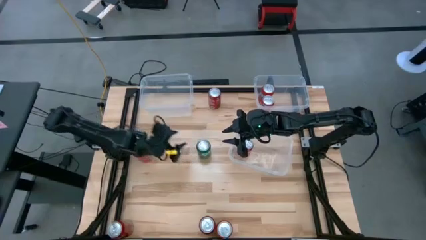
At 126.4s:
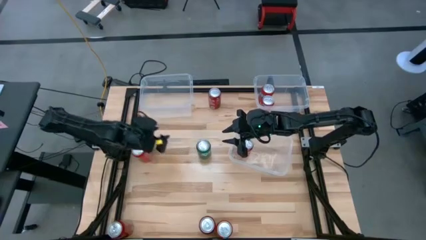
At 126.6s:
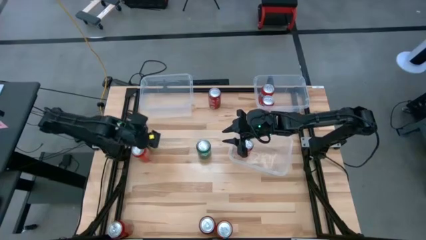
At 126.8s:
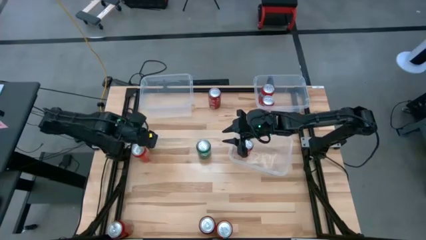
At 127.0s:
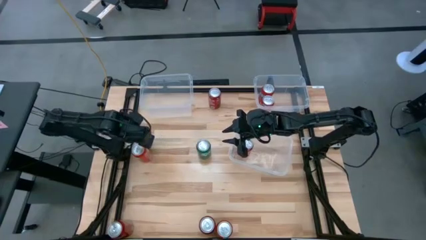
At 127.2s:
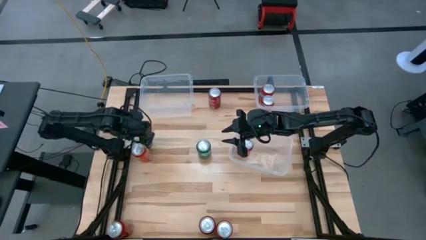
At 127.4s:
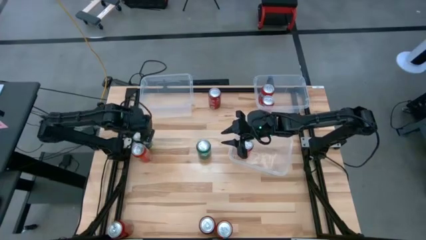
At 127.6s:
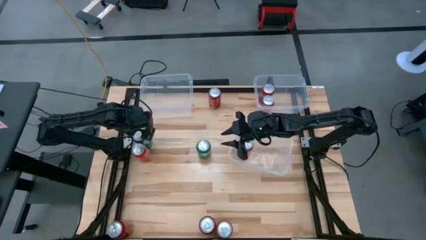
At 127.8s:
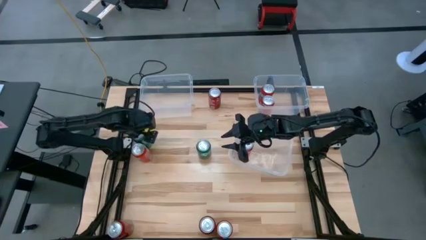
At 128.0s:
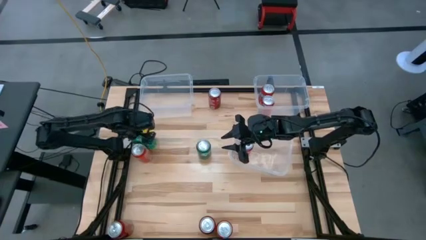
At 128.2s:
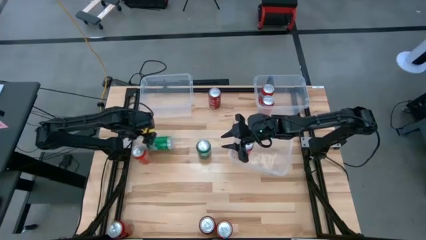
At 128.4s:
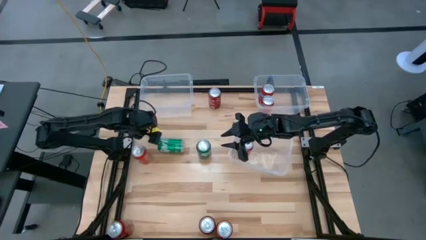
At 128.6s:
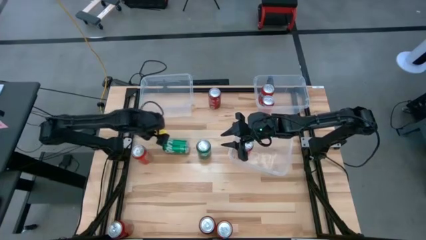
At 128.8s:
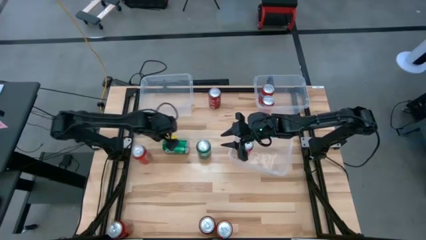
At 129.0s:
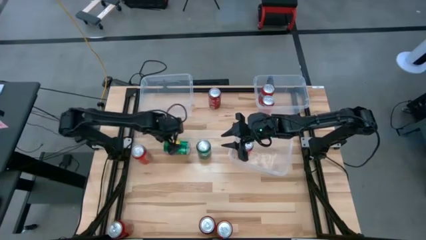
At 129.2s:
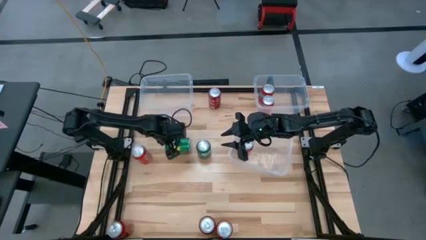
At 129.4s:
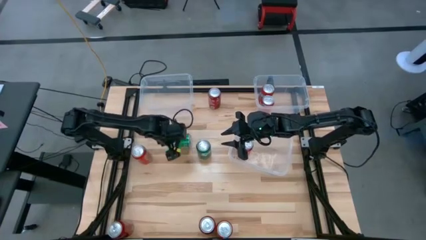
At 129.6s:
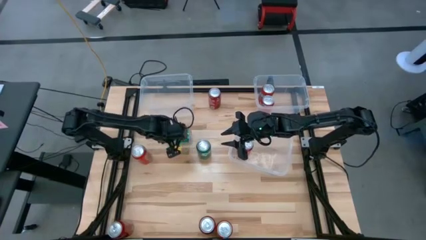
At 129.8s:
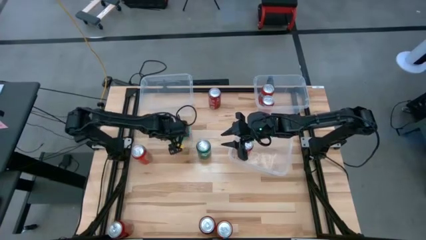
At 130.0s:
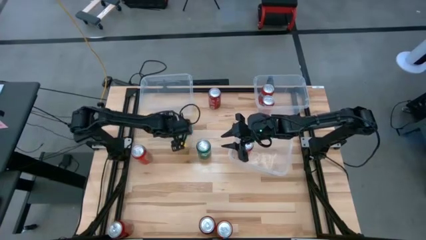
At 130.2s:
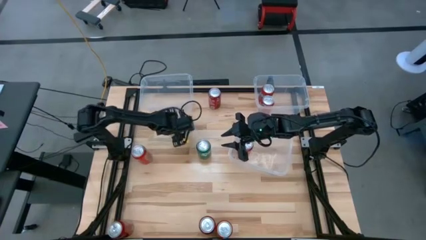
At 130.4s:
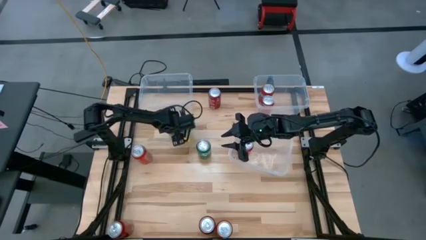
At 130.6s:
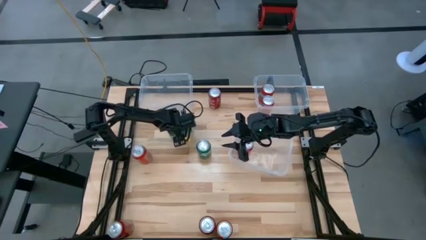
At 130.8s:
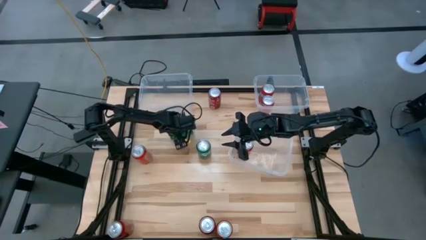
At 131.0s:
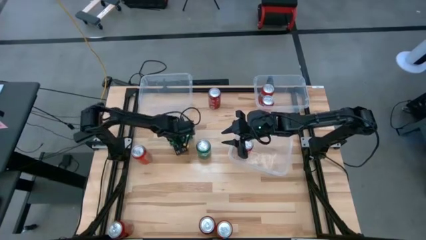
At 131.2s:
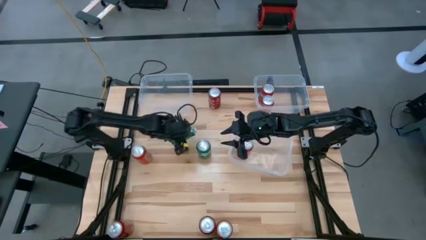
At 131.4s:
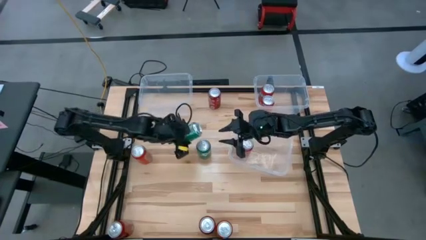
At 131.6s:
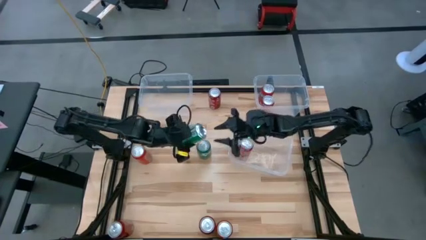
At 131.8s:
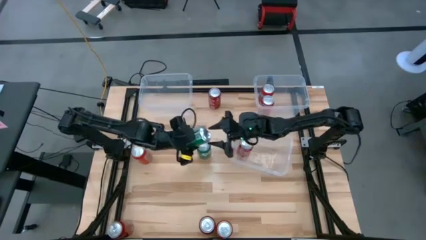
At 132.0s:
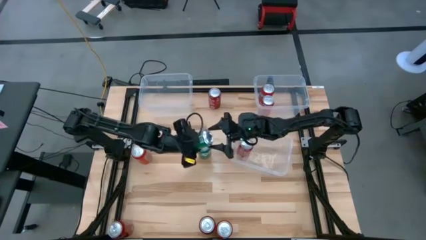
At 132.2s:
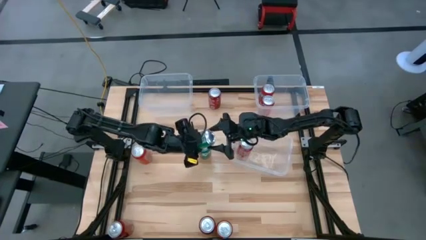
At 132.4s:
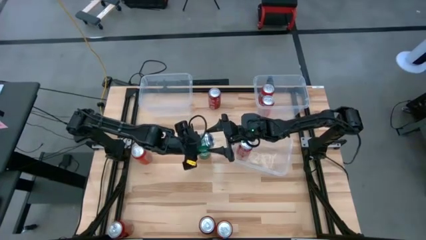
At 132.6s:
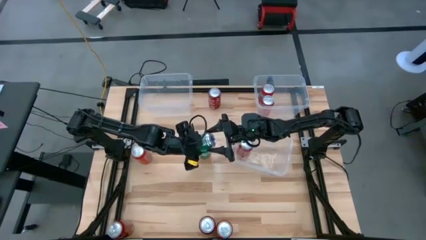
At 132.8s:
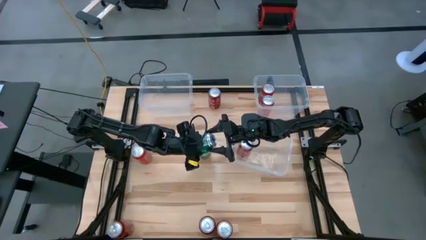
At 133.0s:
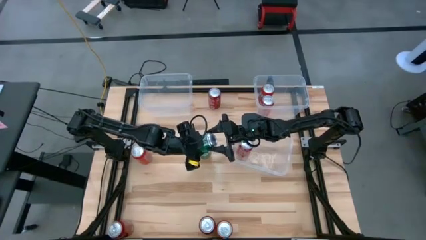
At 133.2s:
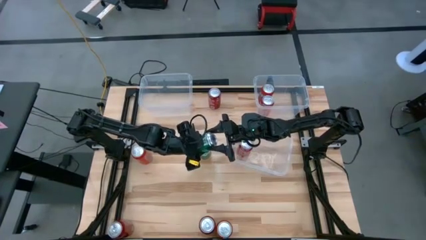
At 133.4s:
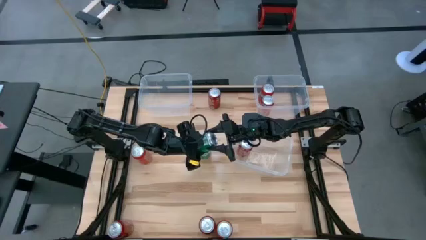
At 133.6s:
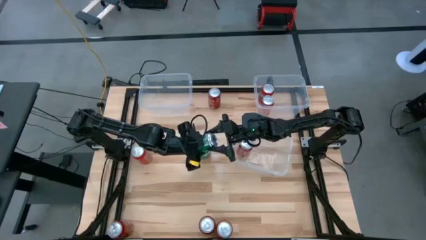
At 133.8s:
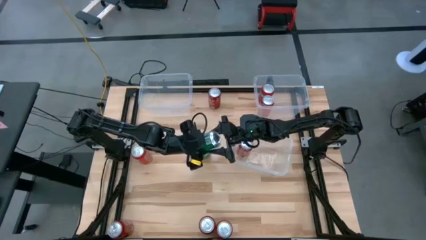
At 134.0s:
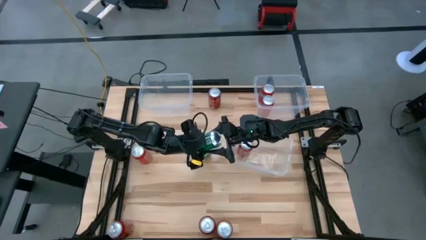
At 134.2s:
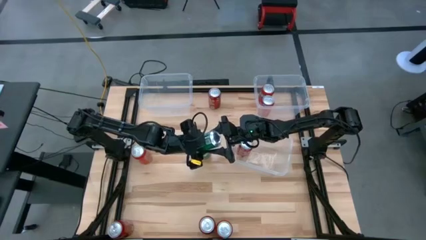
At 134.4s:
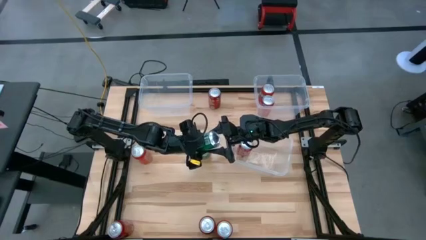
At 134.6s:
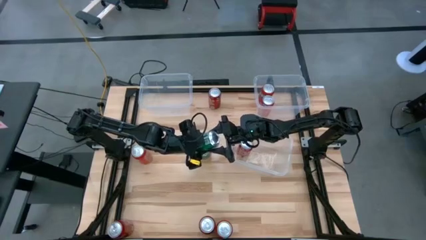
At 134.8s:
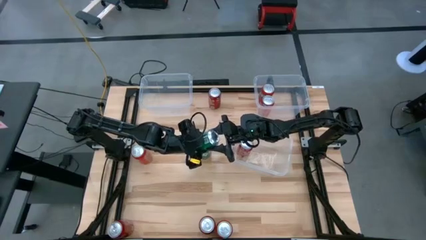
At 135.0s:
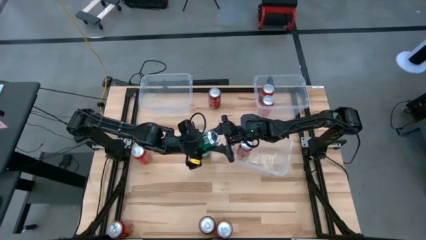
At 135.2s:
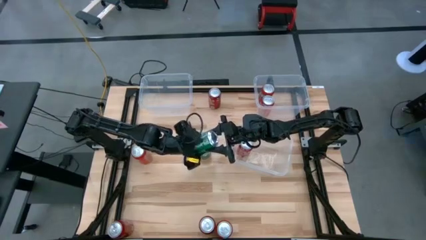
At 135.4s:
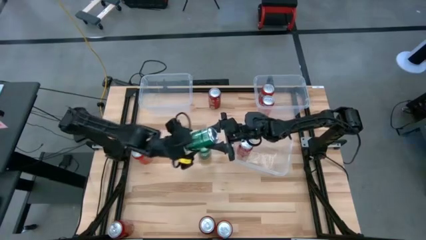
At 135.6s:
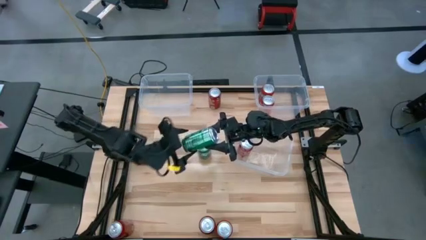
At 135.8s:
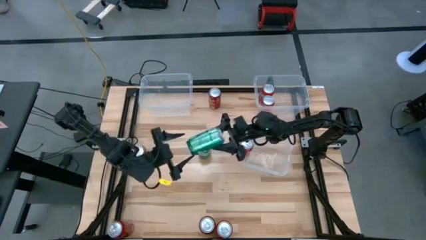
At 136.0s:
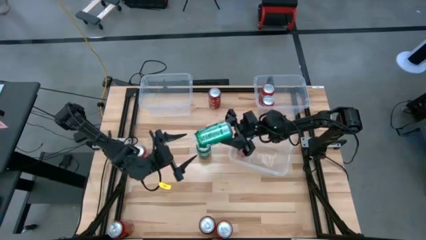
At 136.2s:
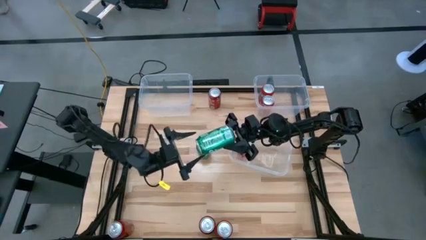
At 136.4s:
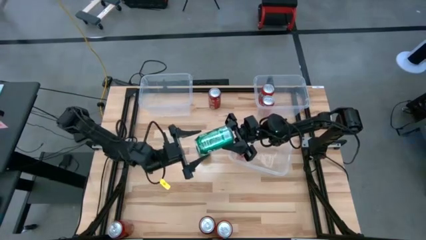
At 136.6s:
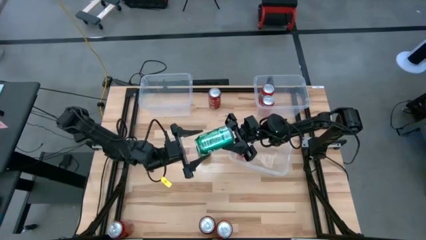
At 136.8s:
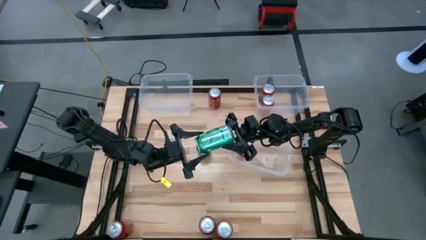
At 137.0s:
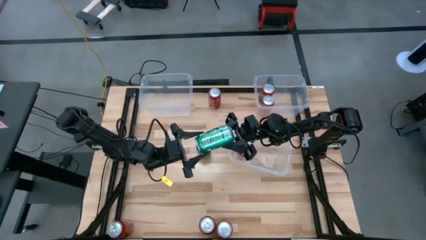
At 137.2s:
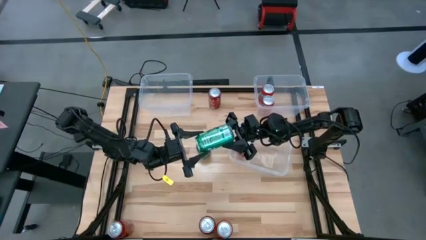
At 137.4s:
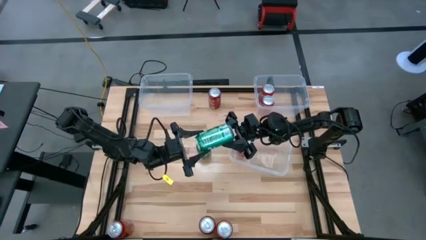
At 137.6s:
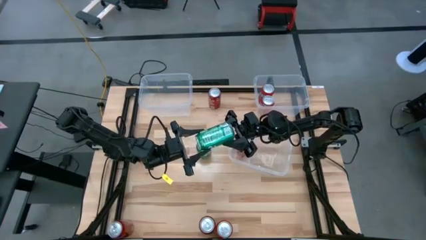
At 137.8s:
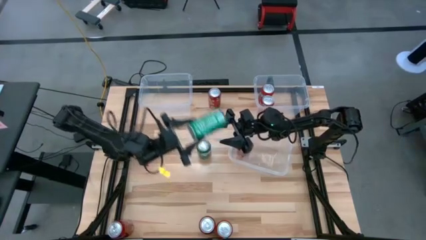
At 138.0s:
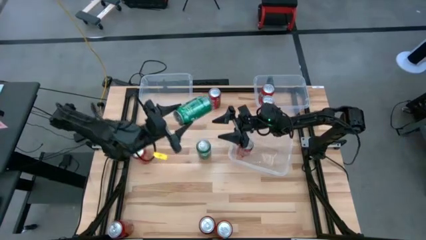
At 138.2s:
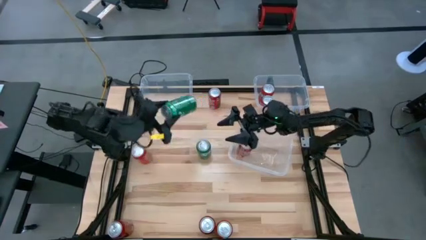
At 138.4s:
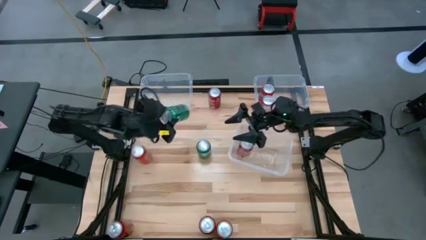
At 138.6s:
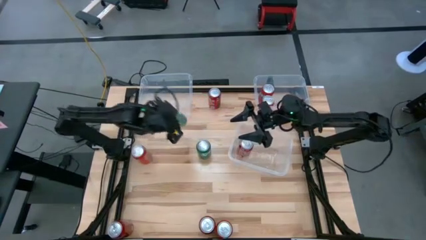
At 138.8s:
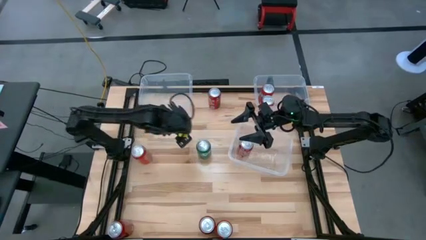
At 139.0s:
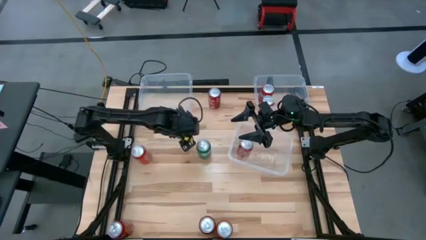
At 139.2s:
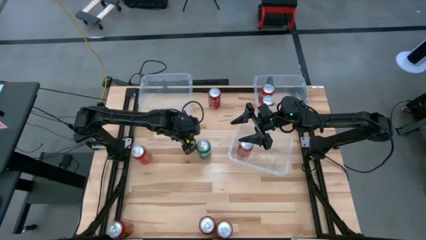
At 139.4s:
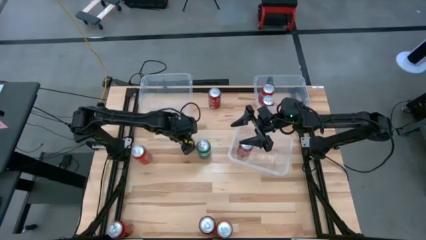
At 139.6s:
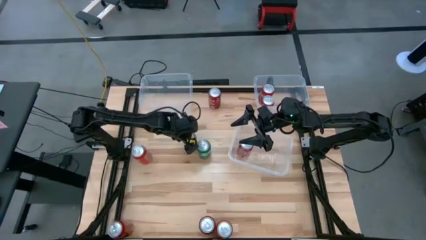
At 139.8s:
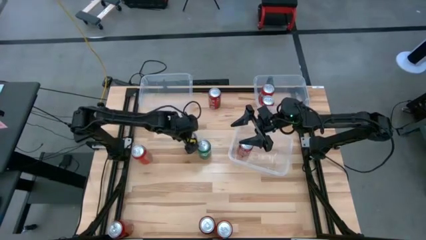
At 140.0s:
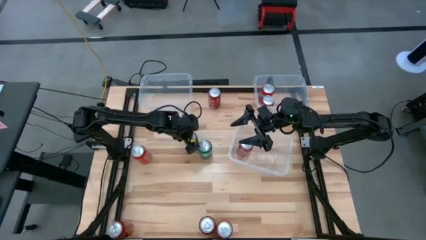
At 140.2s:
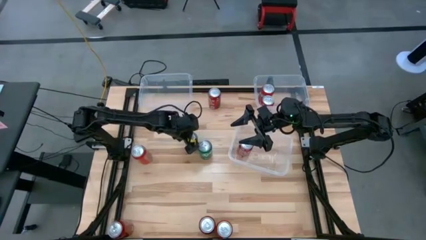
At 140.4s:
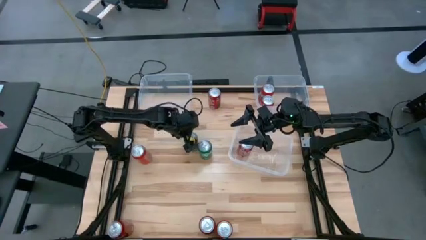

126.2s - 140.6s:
Task: Sort soda cans
Move the left green soda can to the middle of the table

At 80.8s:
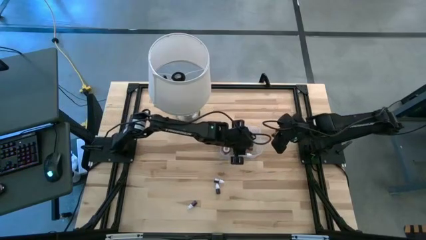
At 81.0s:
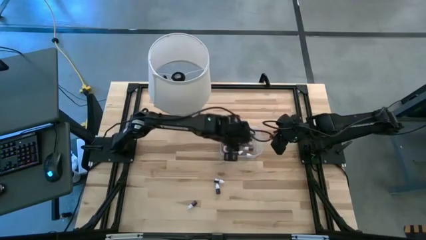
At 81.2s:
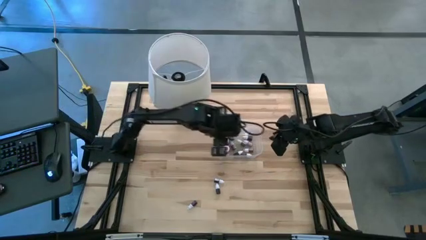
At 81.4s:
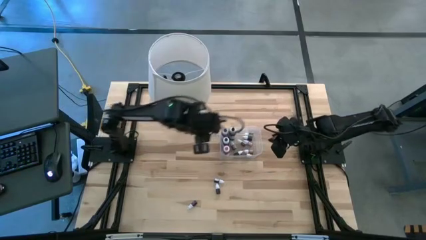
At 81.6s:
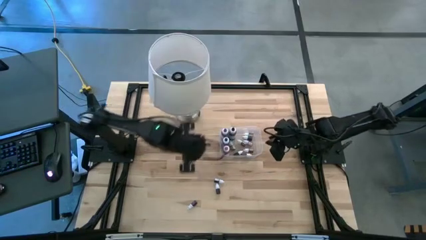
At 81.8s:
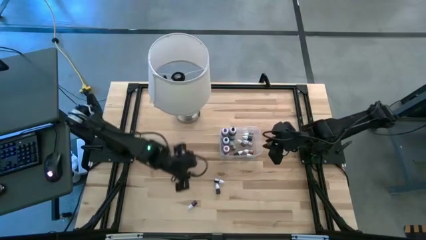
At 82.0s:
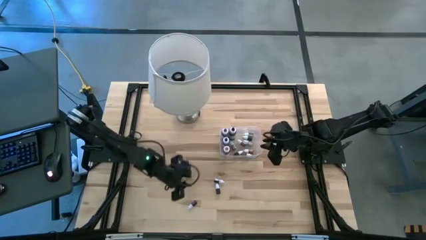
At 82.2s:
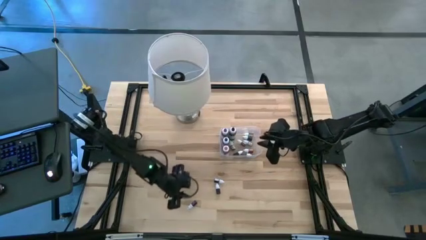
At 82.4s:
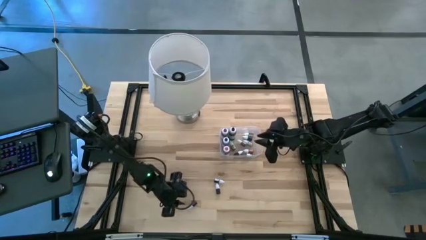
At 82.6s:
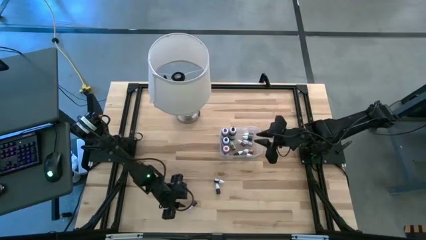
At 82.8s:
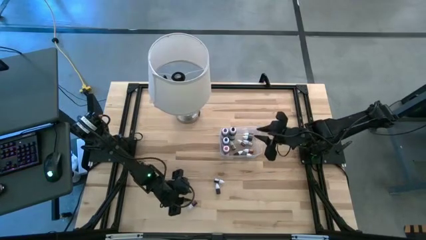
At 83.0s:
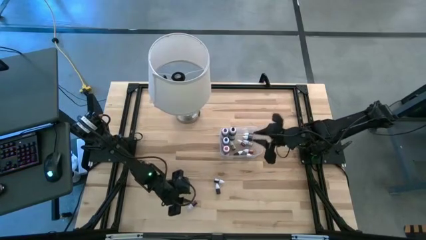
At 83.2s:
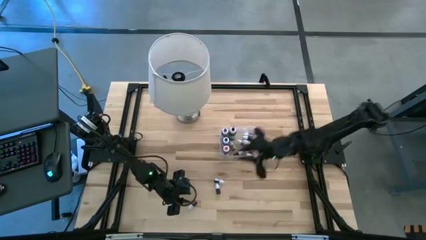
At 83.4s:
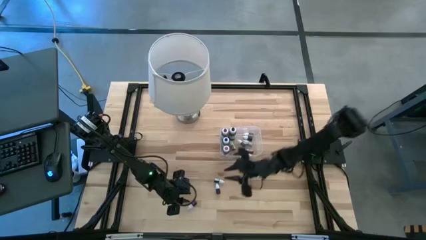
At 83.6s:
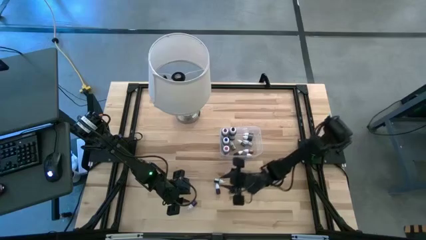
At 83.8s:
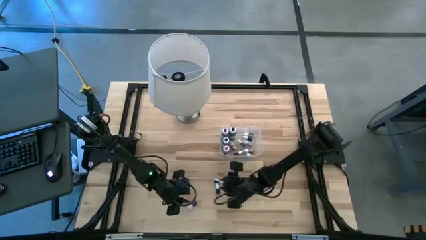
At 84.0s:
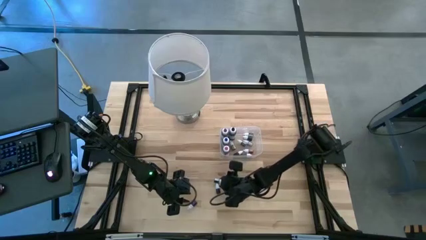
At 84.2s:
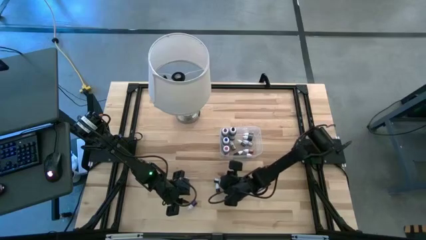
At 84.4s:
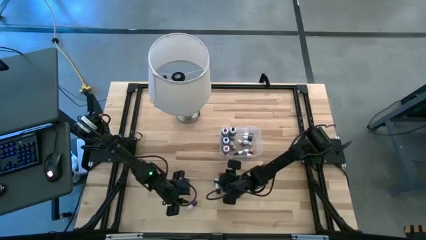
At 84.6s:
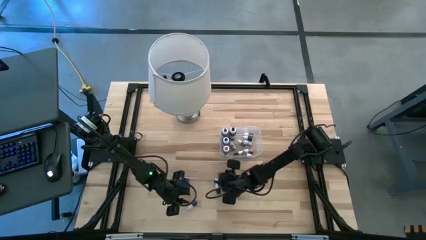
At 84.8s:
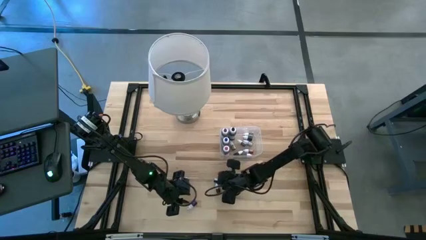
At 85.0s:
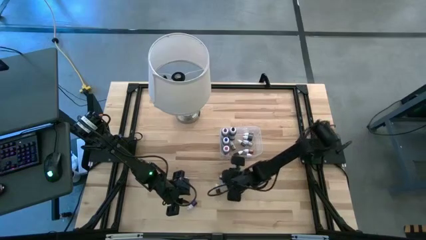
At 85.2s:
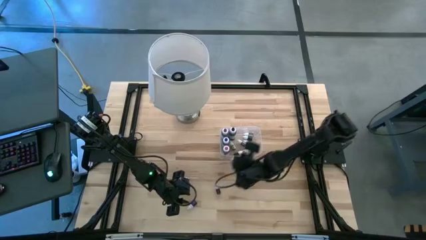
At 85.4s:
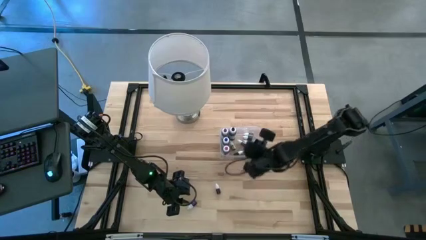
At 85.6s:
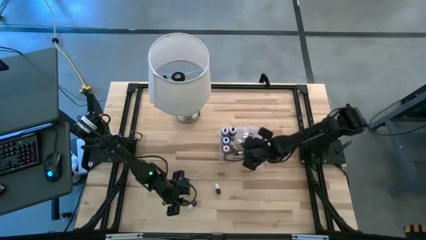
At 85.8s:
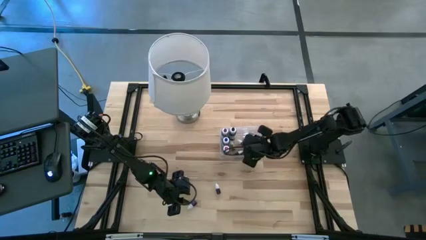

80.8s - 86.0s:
Task: Pick & Place food coloring
Put the small black food coloring bottle into the transparent bin
